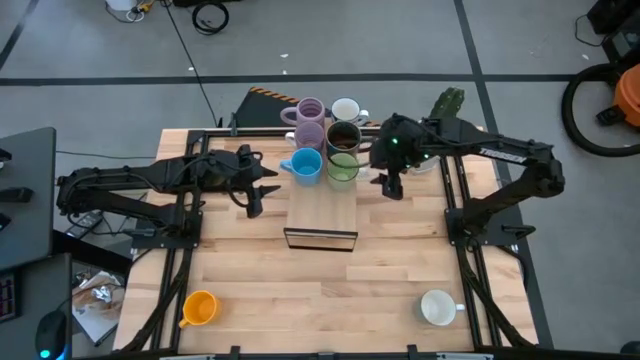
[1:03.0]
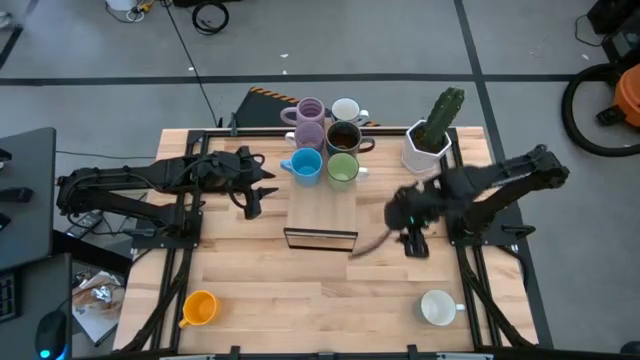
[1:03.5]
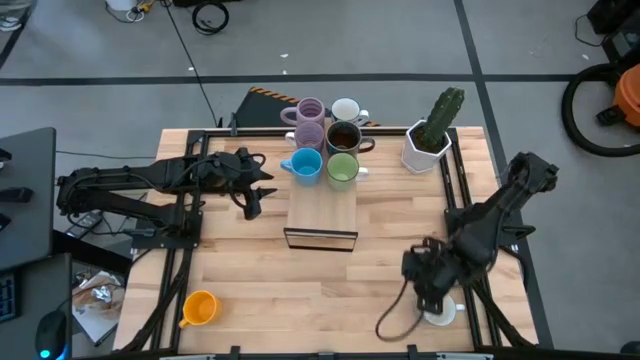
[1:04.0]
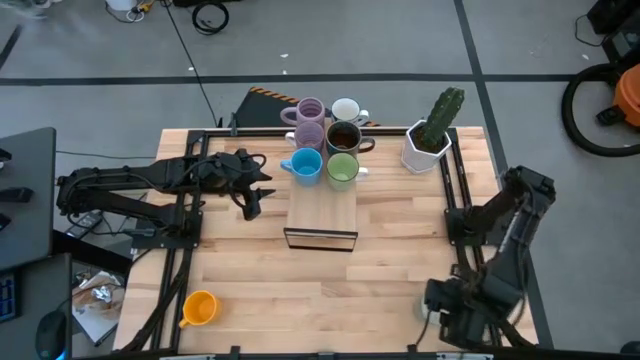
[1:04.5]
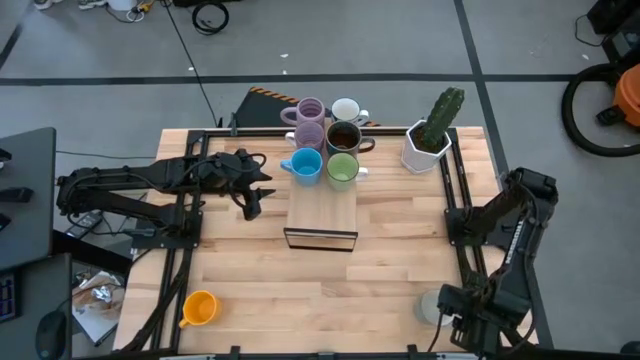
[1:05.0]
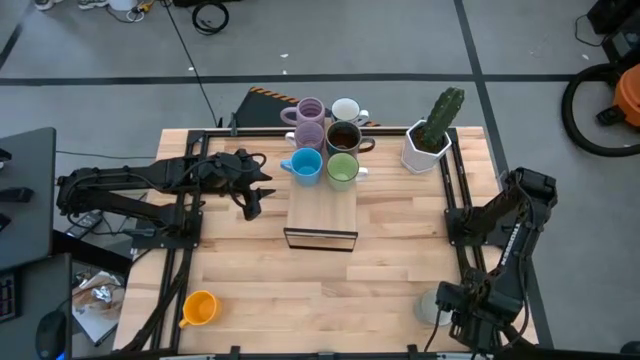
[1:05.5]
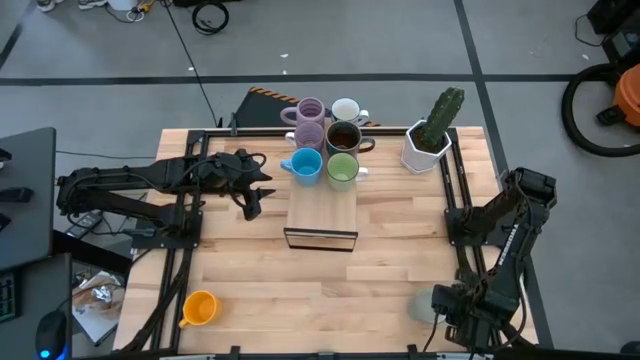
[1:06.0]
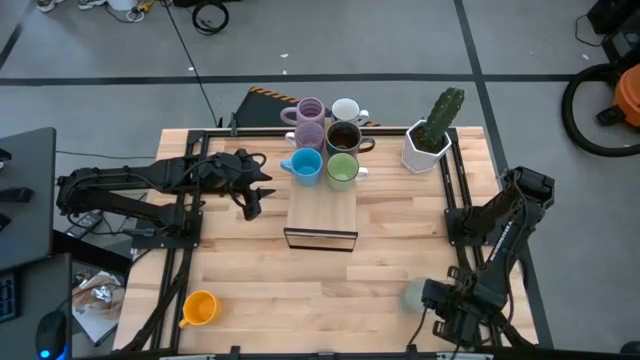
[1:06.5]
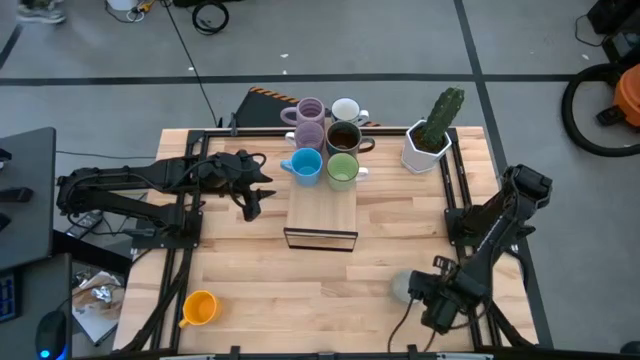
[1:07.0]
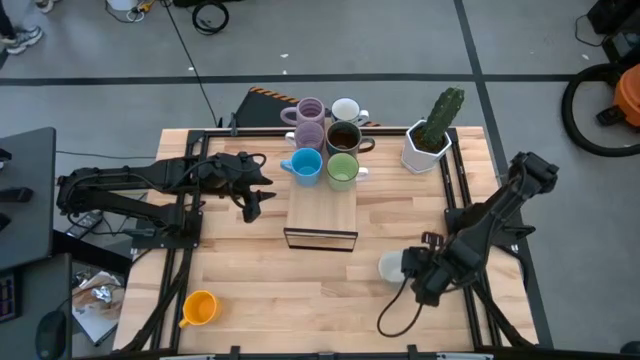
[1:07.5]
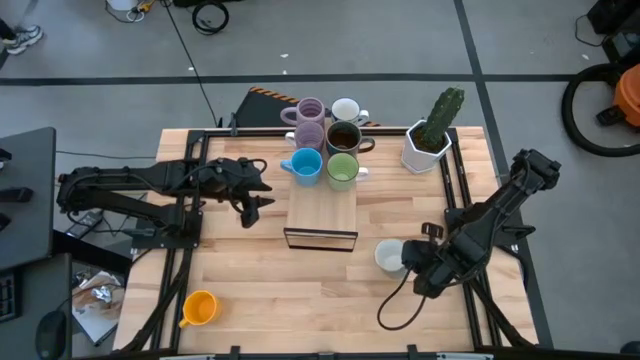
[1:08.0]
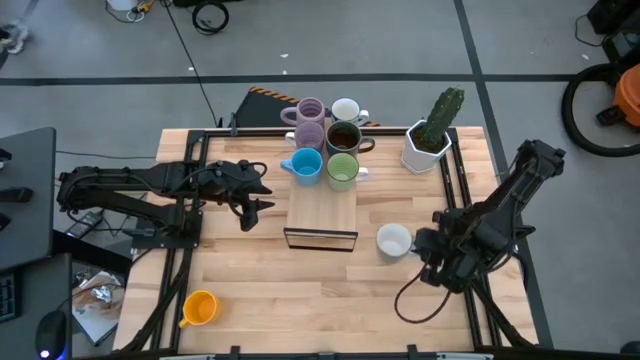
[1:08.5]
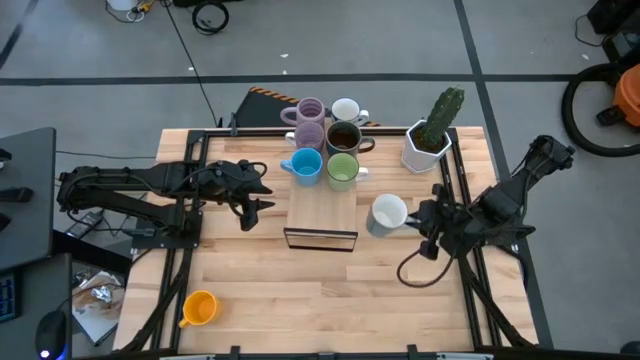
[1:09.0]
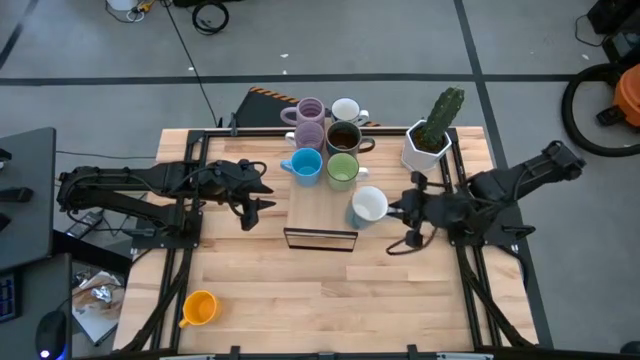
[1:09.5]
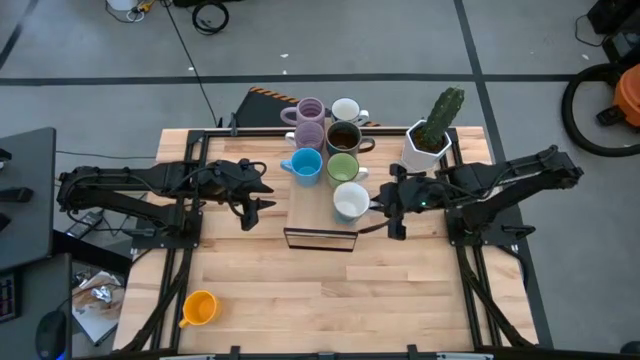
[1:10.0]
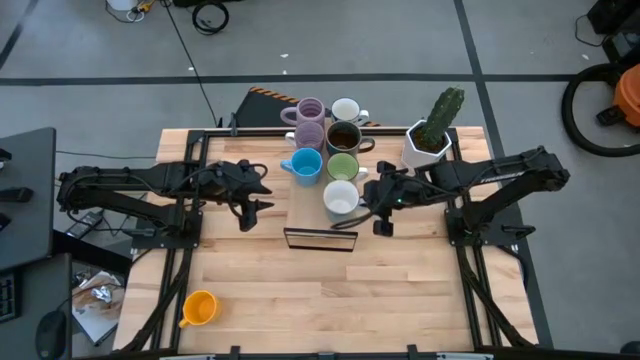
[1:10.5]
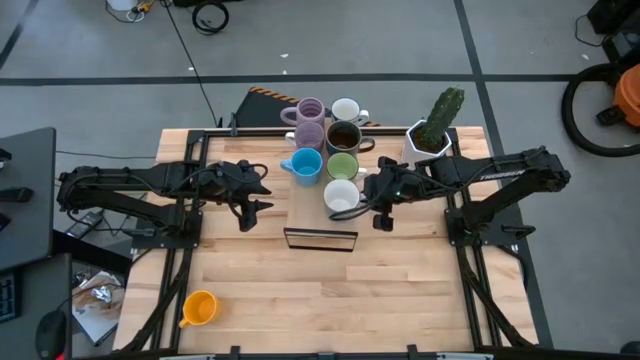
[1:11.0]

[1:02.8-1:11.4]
Task: Place coffee mugs
Put the light blue mug on the shelf

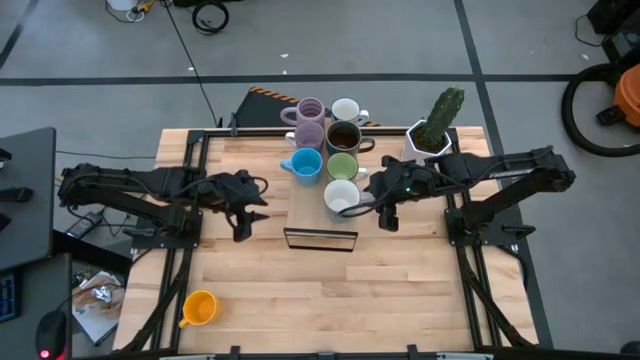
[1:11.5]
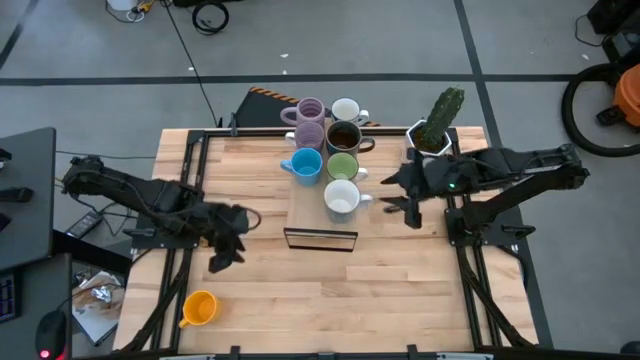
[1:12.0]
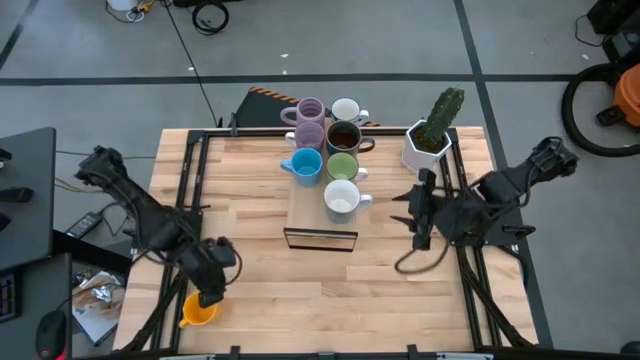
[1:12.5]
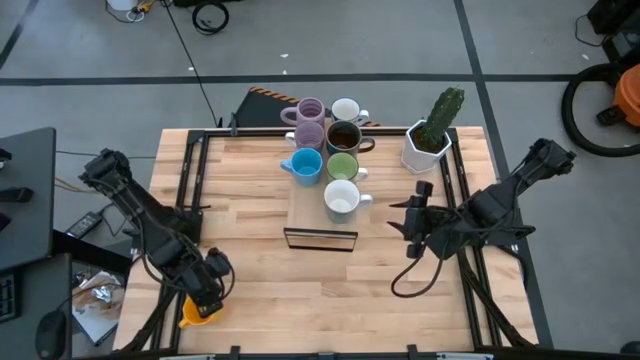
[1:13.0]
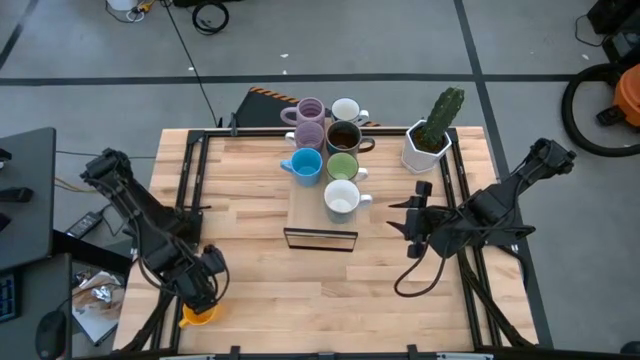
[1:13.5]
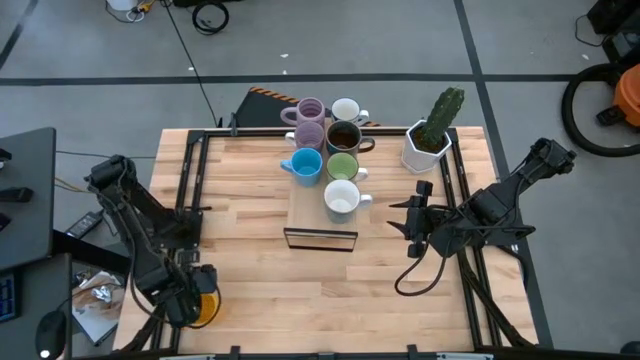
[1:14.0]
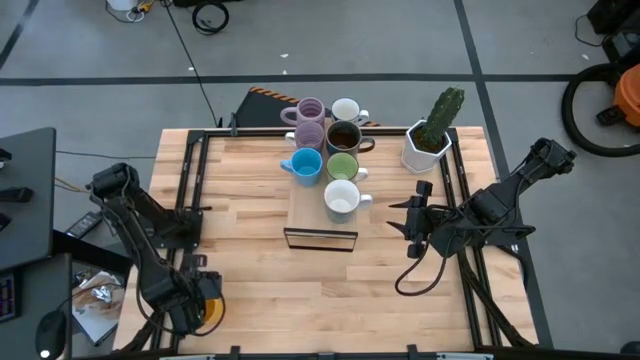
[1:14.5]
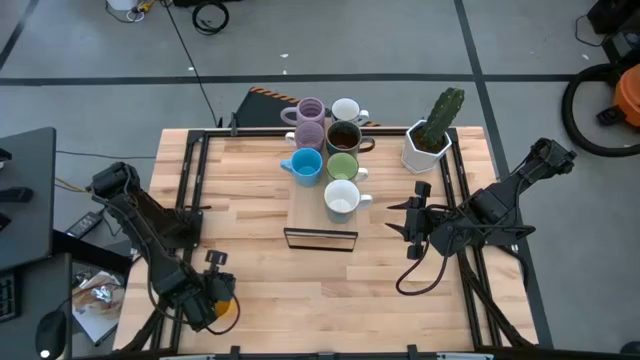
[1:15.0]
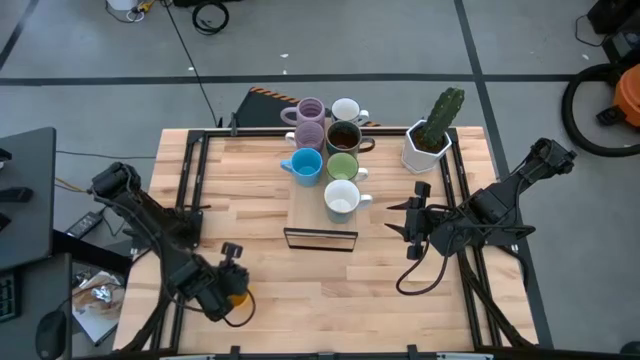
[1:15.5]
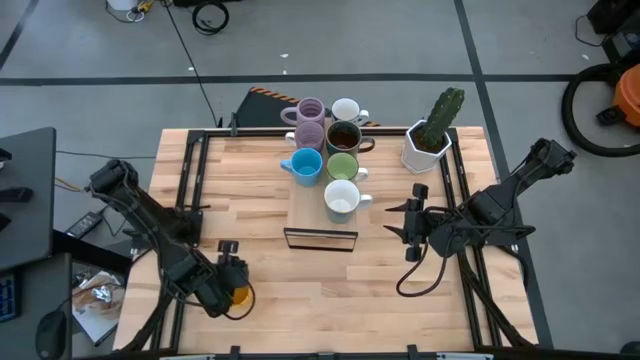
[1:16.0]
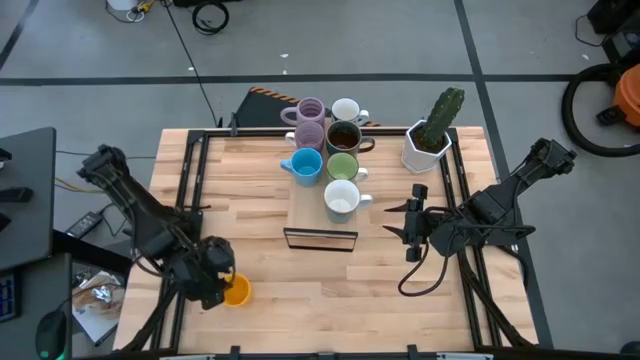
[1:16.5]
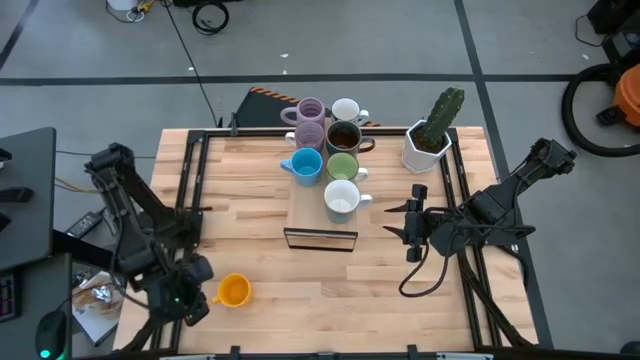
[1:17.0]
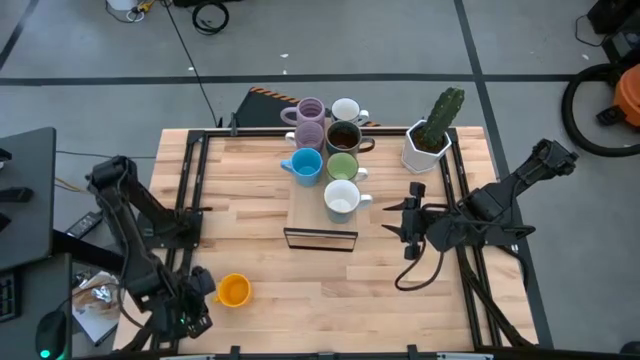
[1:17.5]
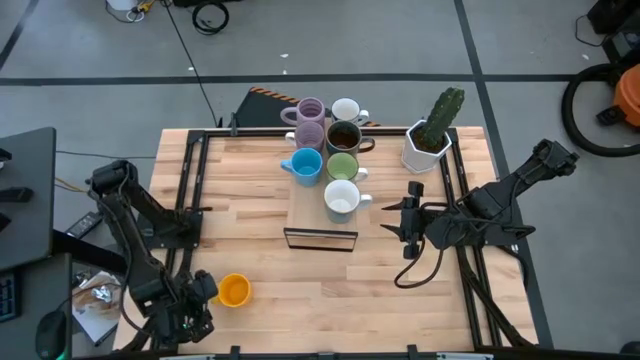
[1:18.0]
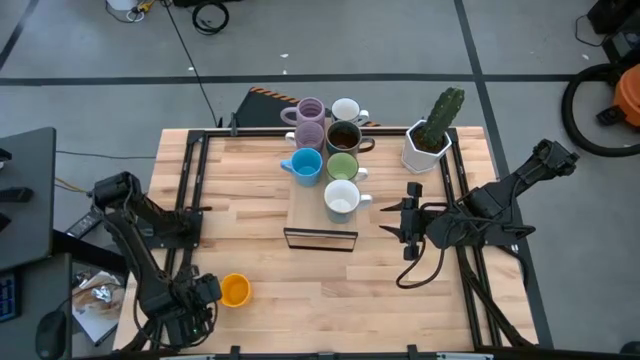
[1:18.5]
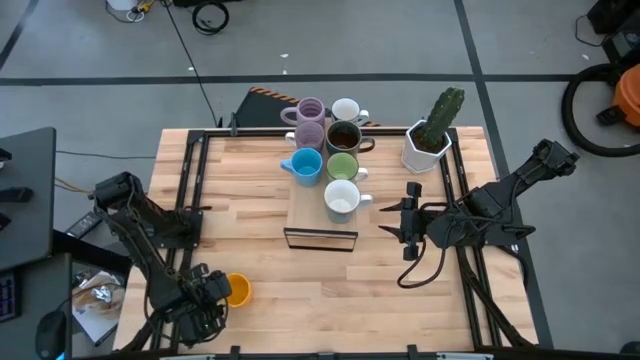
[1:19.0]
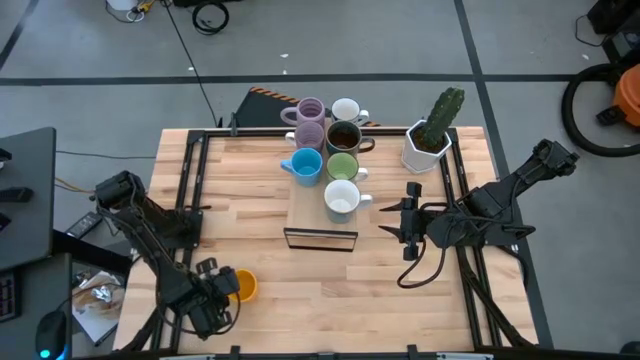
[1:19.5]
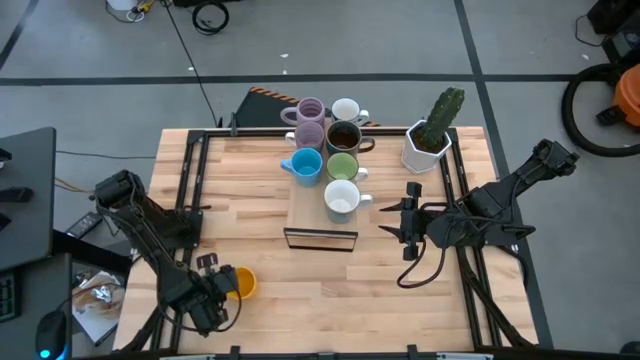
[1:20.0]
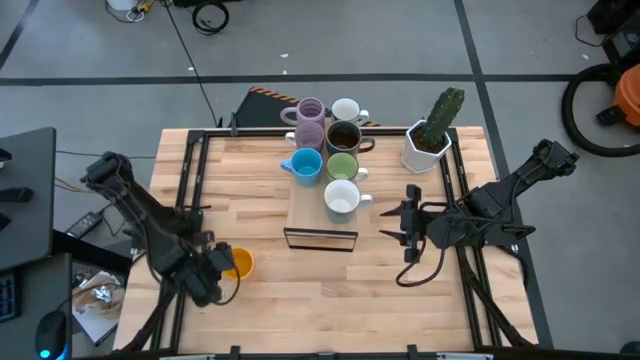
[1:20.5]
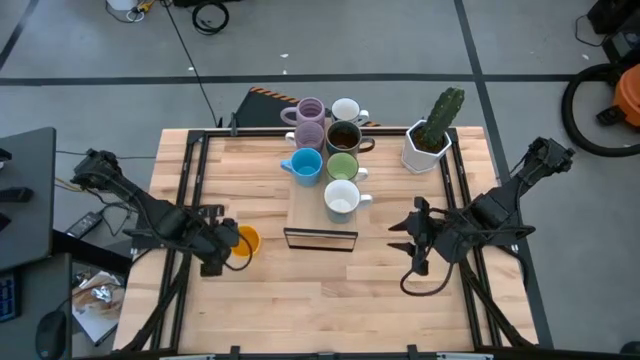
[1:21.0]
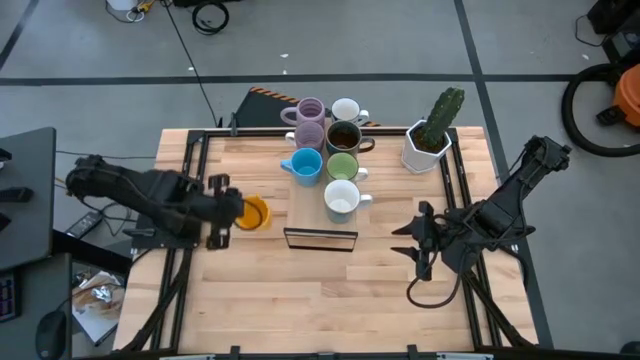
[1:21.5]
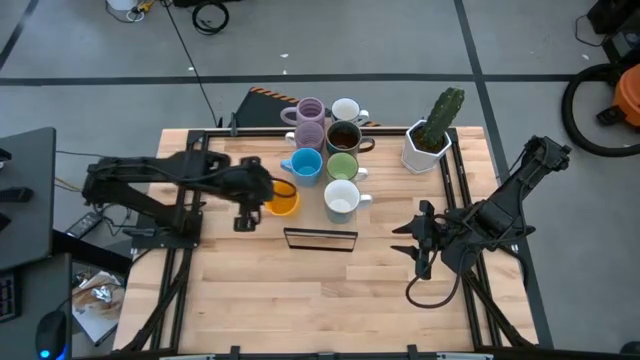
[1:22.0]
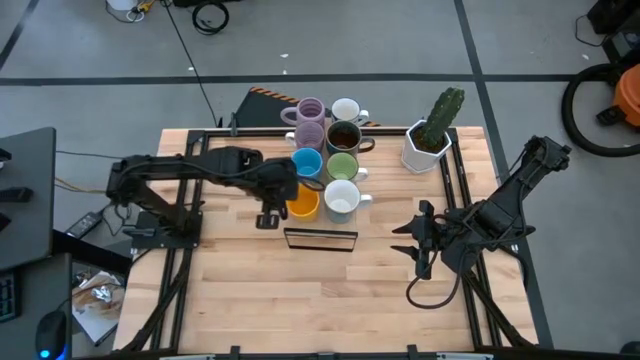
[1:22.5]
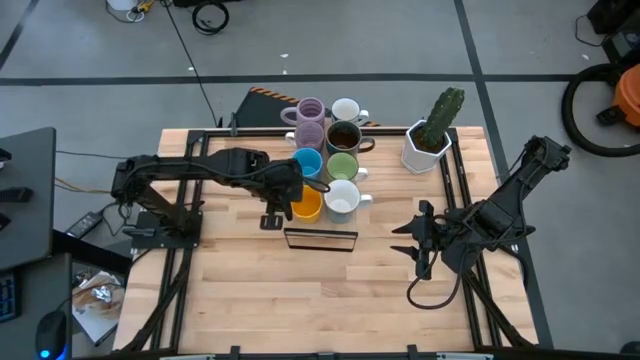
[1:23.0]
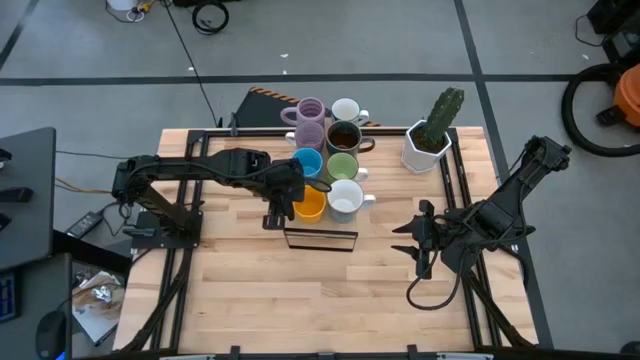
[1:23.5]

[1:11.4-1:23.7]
Put the yellow mug on the shelf

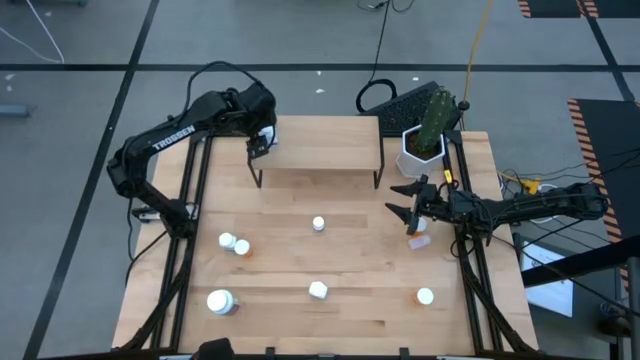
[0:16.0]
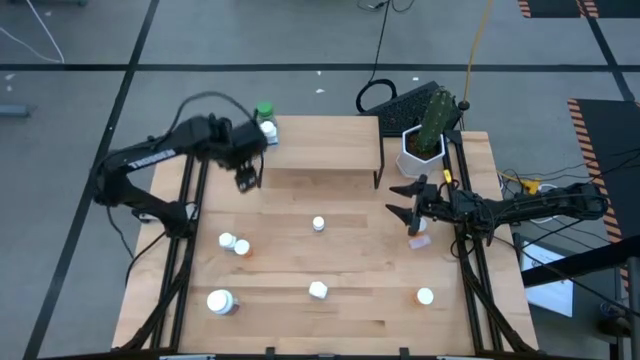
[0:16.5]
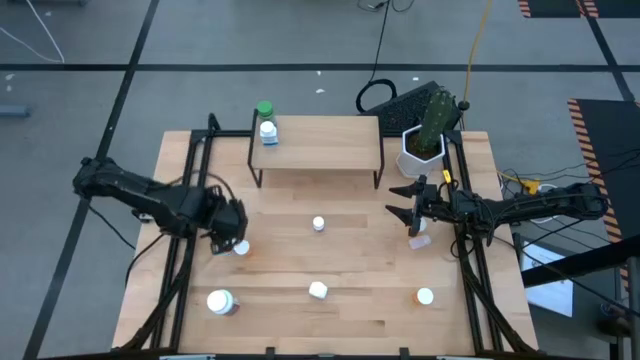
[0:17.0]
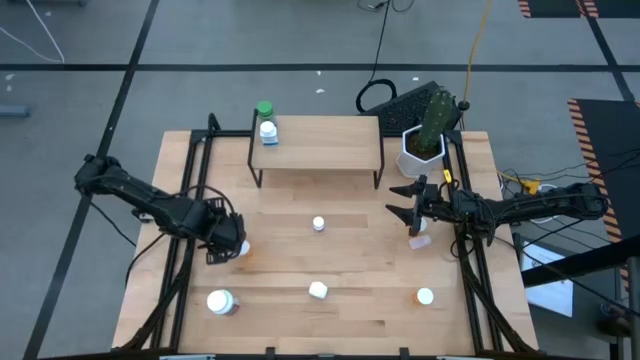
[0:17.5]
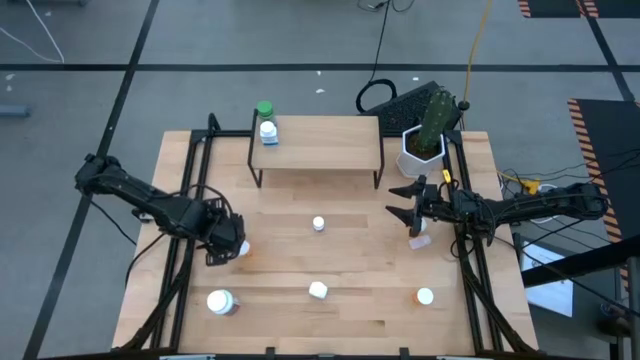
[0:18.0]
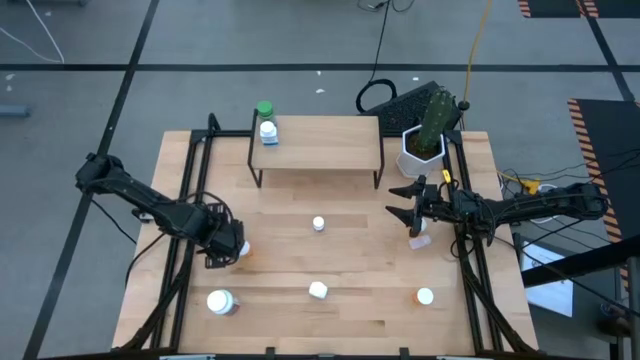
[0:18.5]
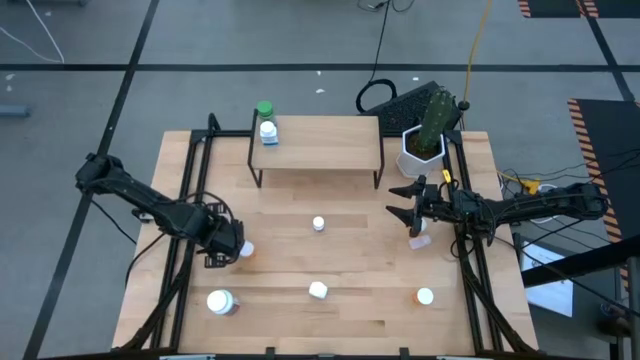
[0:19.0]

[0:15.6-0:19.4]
Task: Pick and place medicine bottles onto shelf by color
Put the top left white medicine bottle on the shelf
